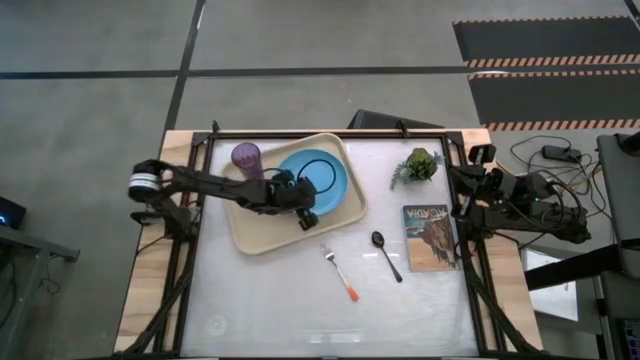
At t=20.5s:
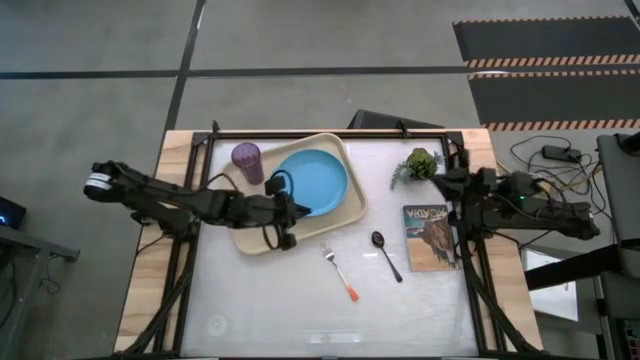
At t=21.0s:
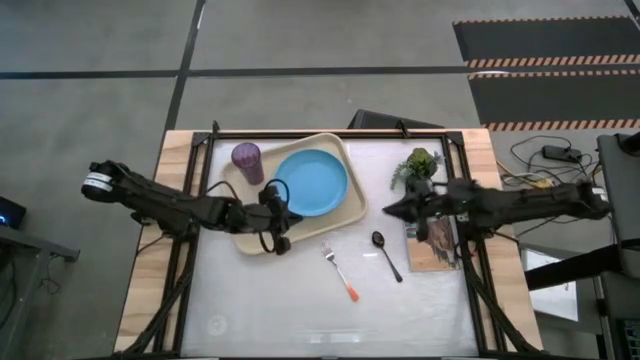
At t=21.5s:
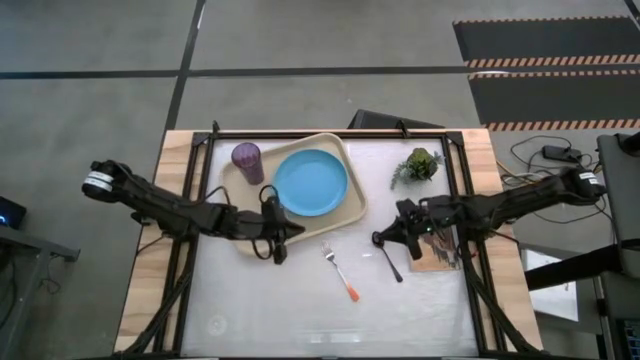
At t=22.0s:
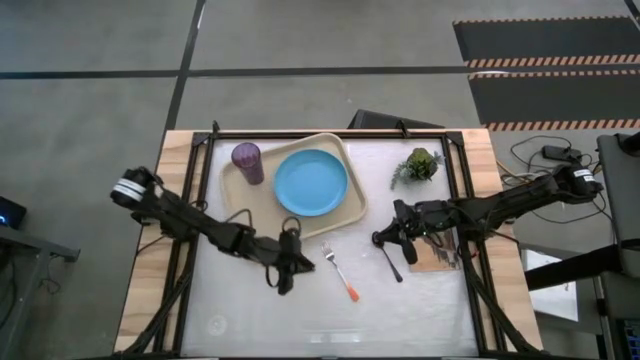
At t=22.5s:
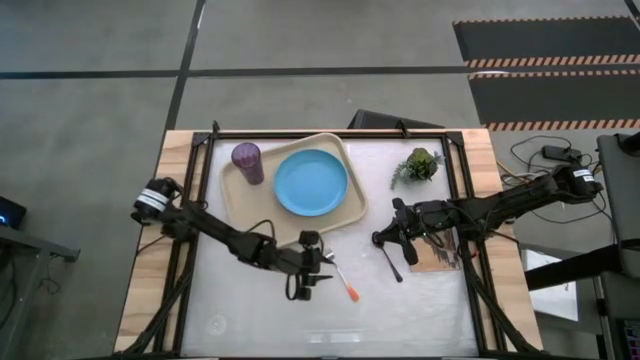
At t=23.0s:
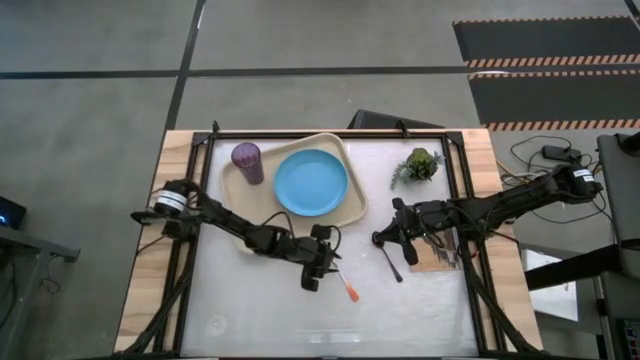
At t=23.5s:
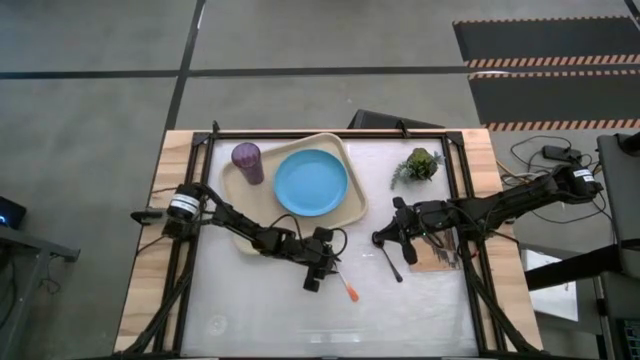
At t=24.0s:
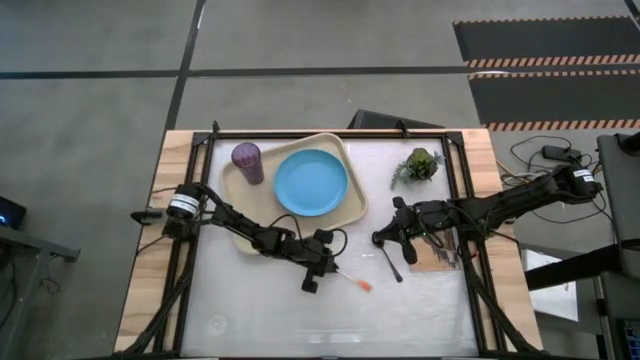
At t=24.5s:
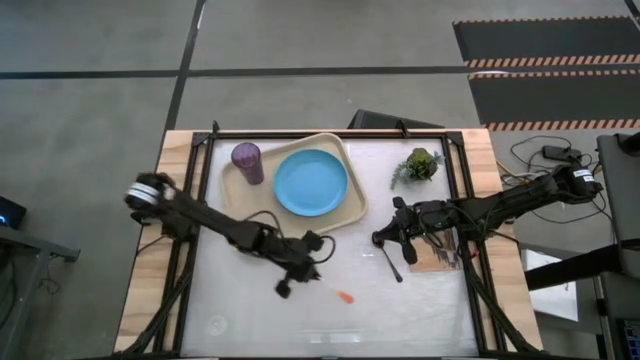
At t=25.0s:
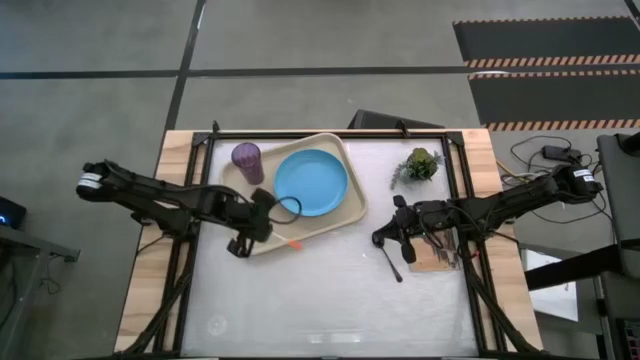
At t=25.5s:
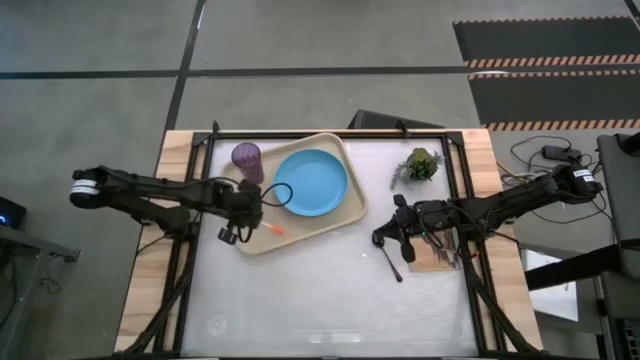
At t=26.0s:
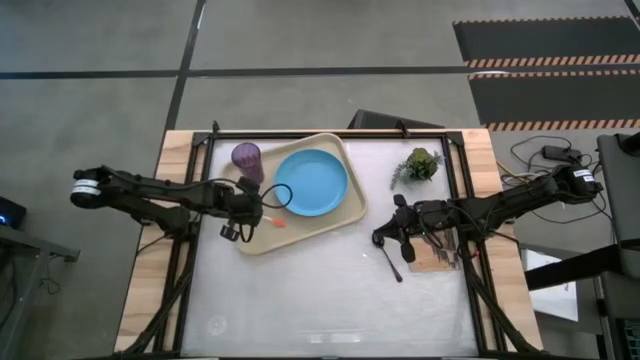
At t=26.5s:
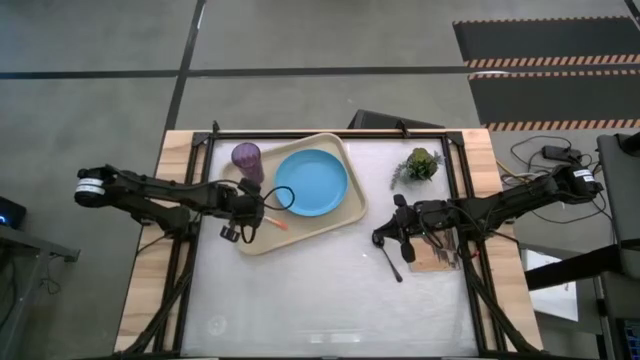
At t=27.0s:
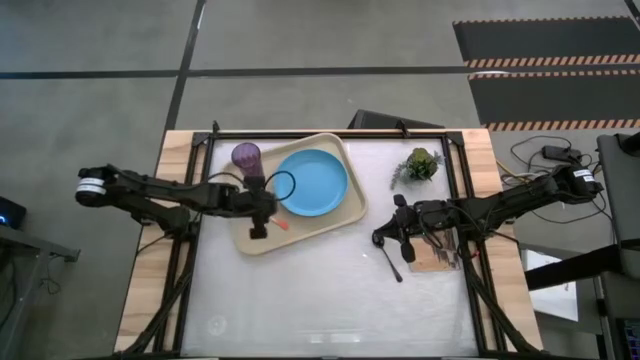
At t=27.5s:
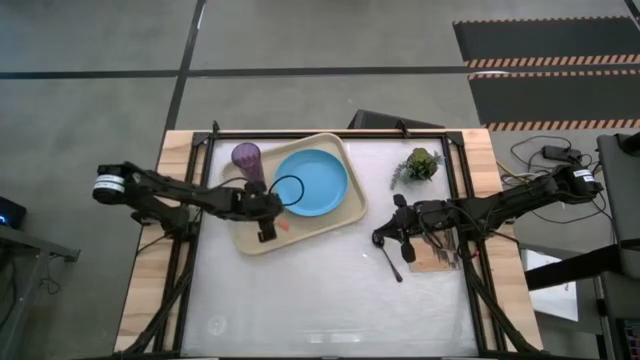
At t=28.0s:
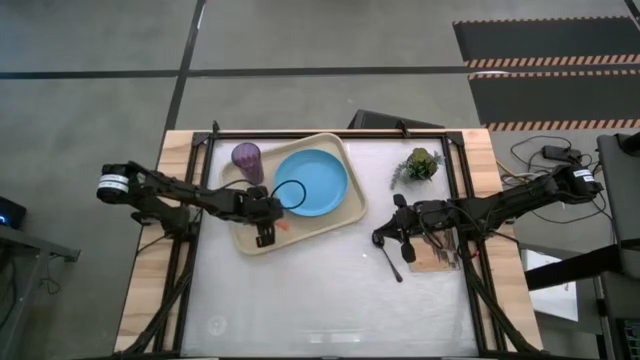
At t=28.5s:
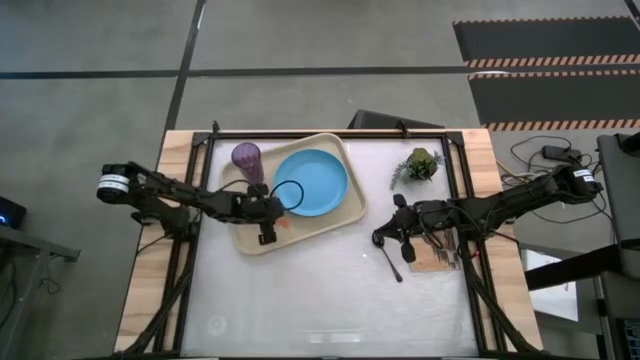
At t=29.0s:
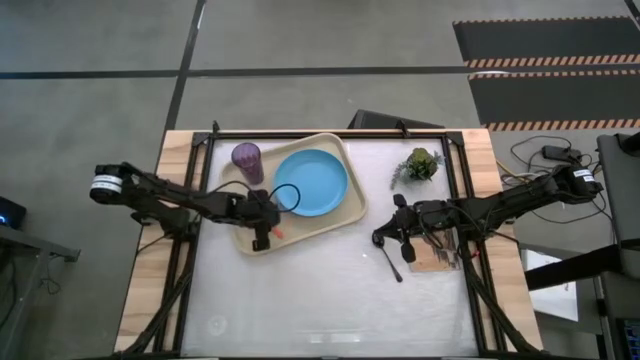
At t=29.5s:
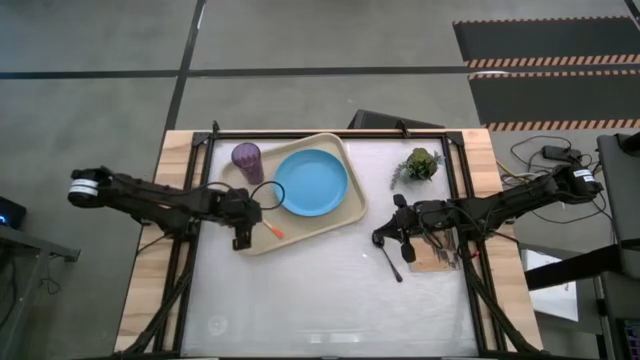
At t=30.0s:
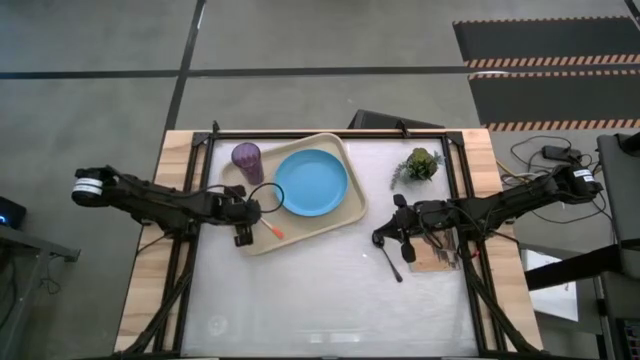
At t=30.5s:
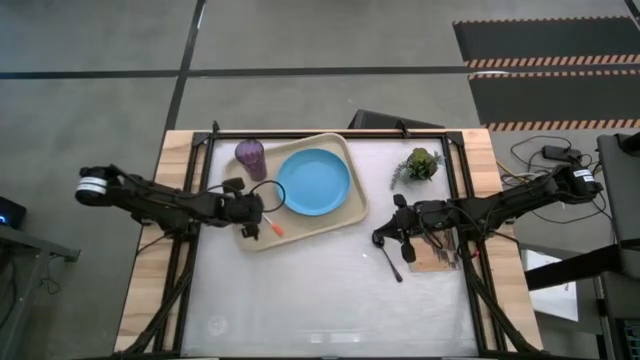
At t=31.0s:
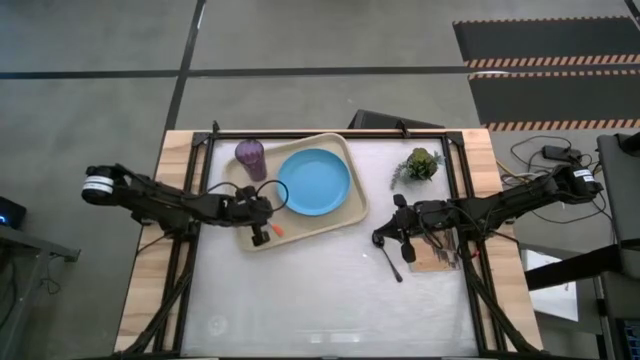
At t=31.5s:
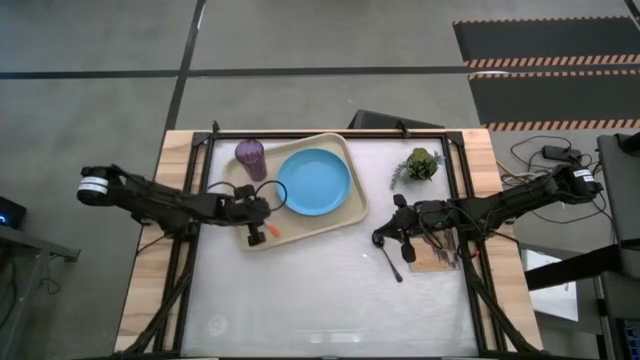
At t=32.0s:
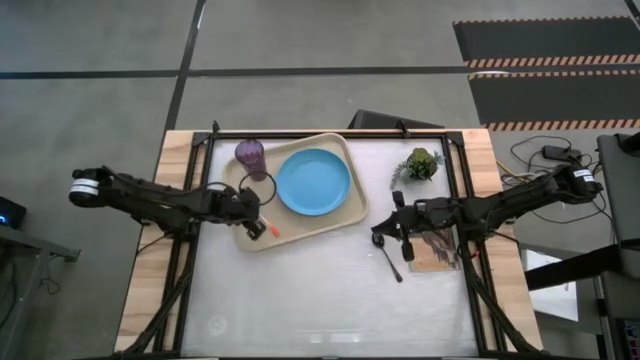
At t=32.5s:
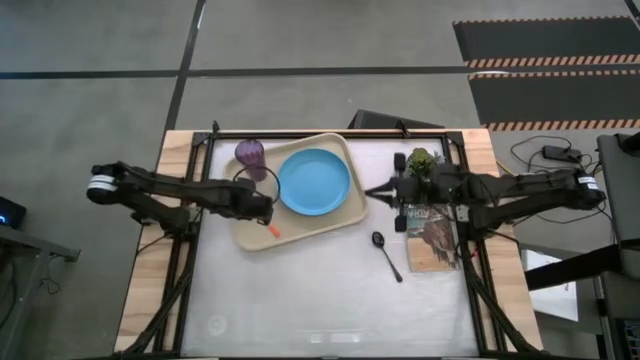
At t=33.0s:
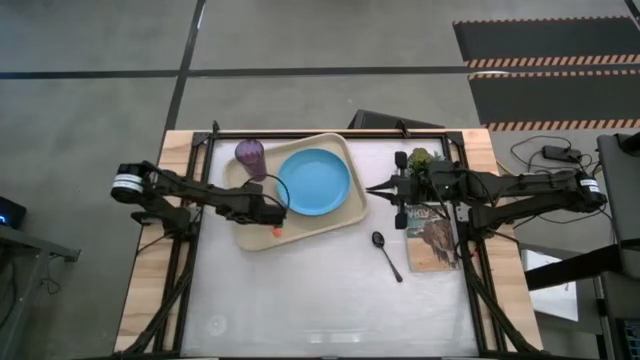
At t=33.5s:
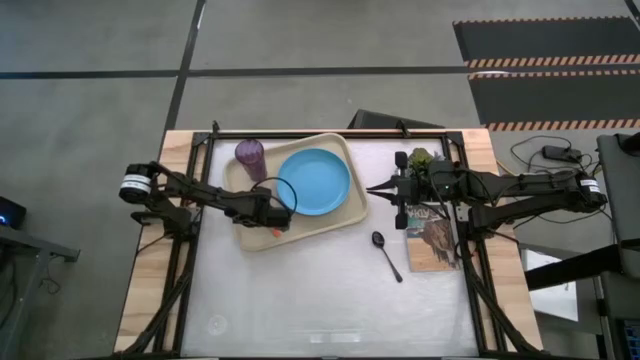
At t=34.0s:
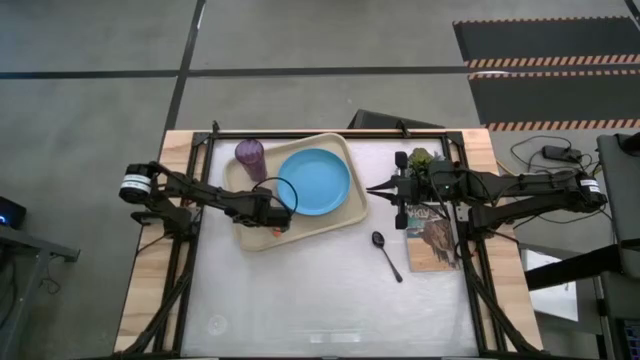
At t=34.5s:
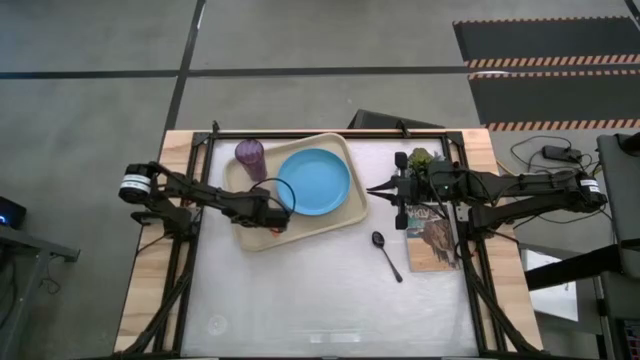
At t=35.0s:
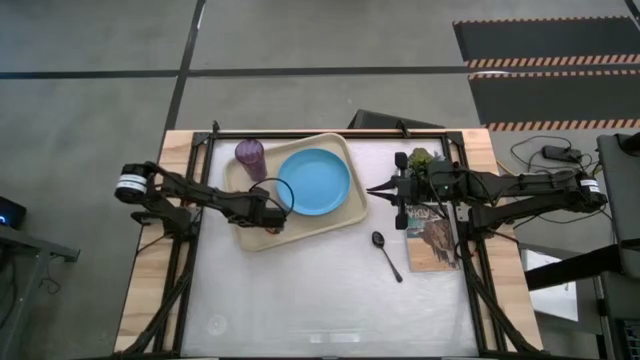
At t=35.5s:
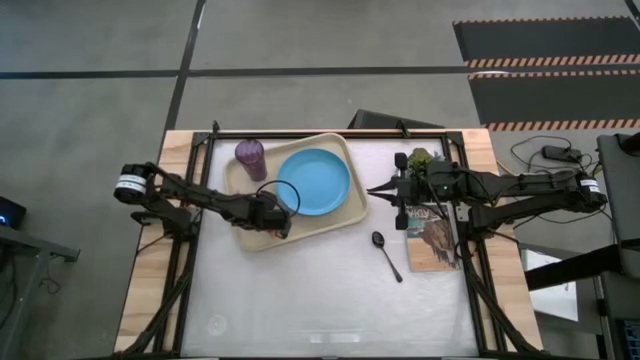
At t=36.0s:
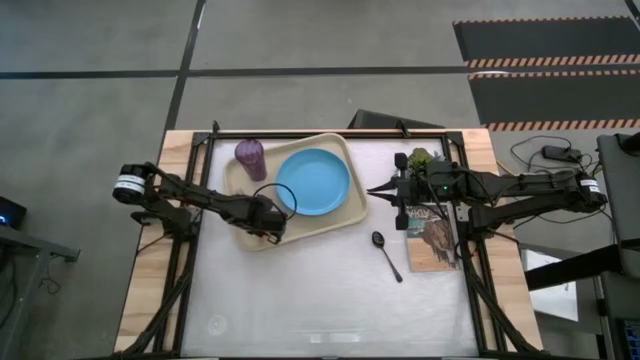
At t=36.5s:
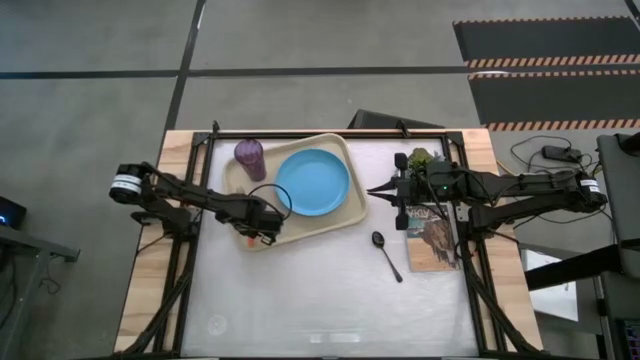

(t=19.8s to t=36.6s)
Task: Pick and place plate/cup/fork/spoon on tray
Put the orange fork on the gray tray to the left of the blue plate

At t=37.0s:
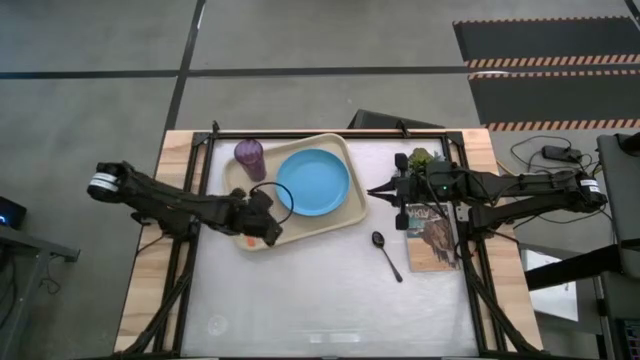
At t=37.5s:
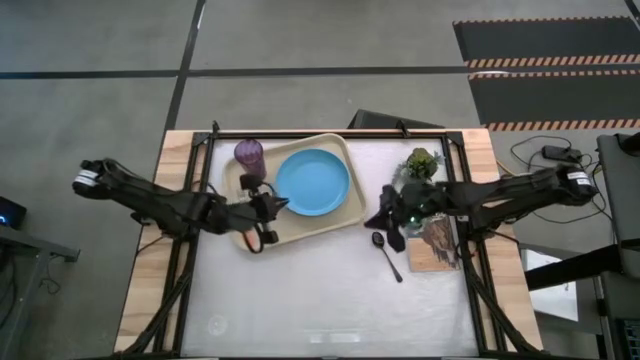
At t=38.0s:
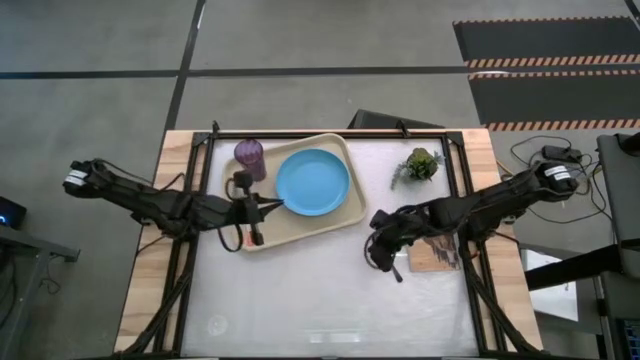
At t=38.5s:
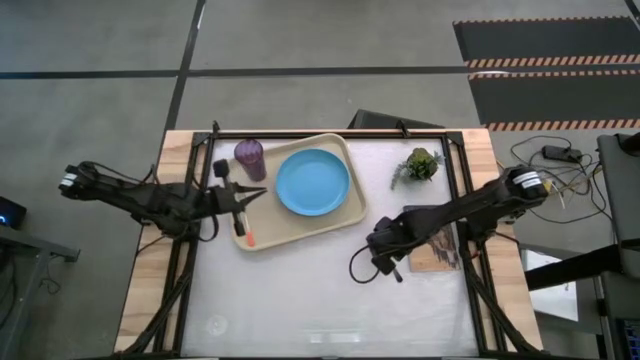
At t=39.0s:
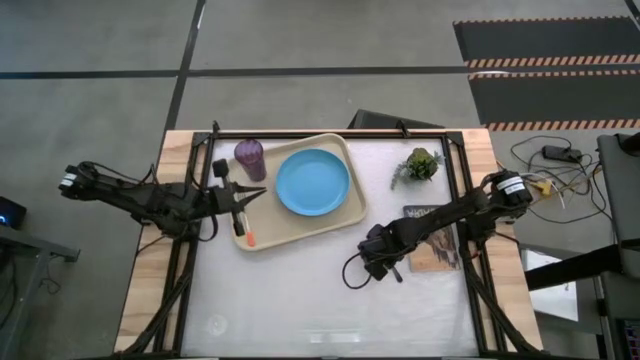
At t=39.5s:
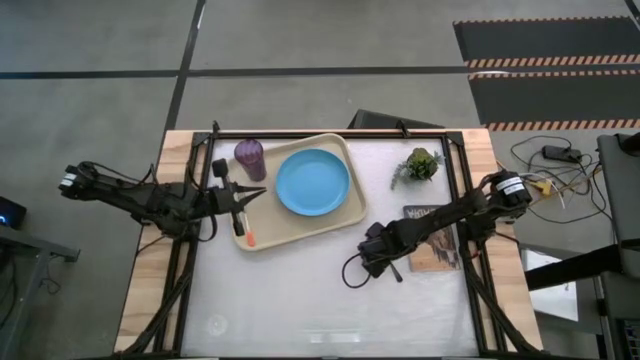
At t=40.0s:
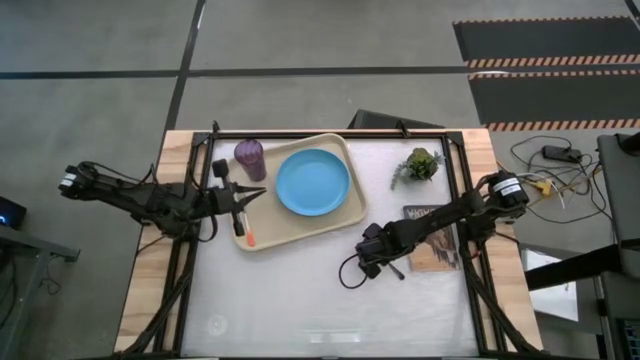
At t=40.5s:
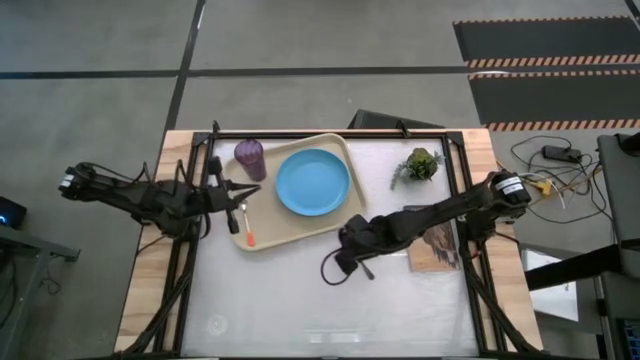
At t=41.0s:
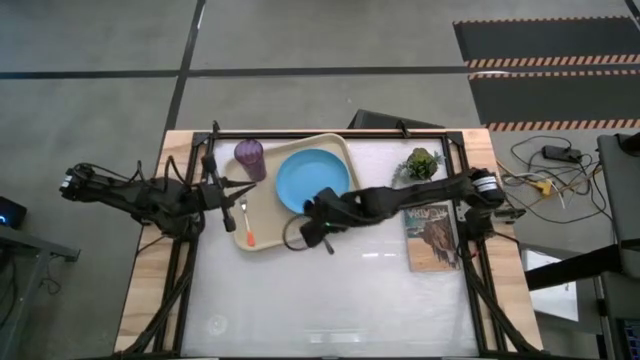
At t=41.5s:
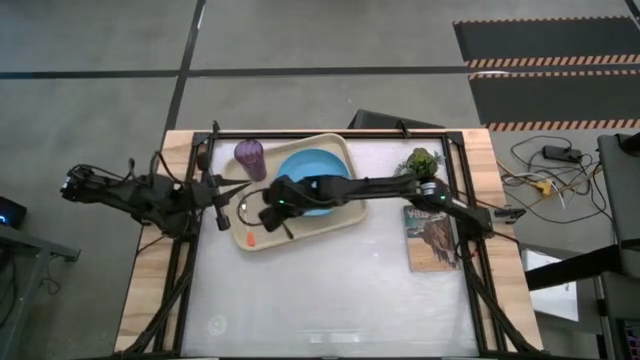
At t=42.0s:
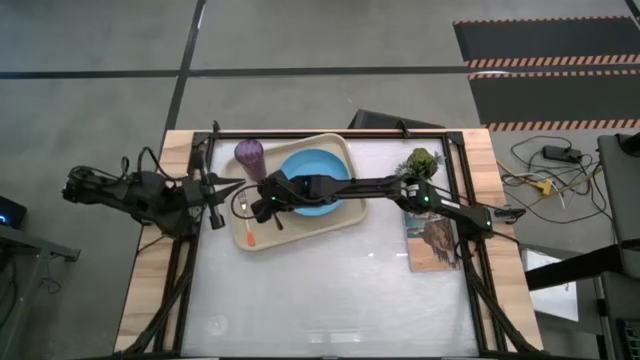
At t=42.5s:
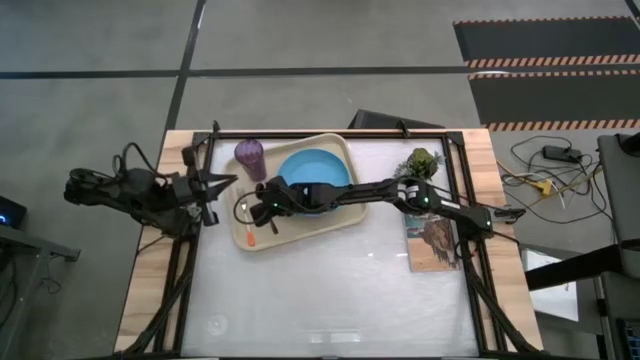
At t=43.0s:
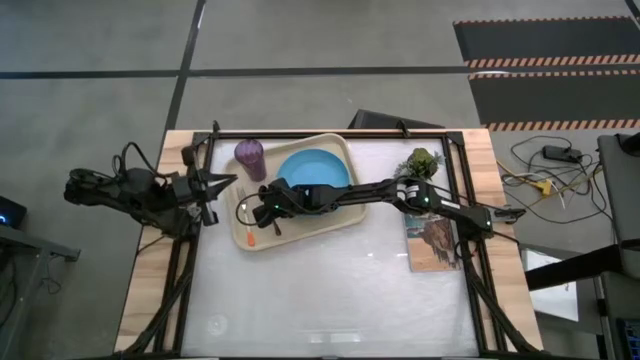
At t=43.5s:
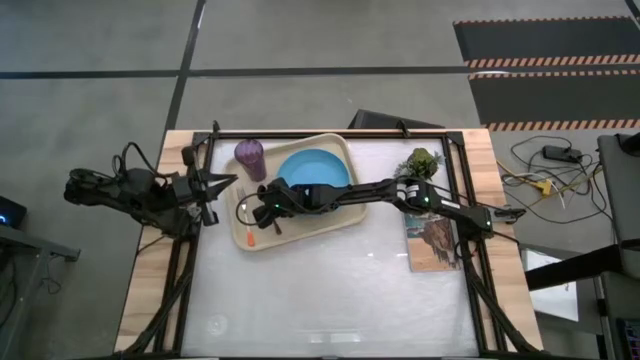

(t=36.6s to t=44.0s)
Put the black spoon on the gray tray to the right of the orange fork
